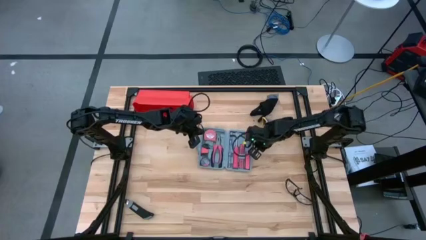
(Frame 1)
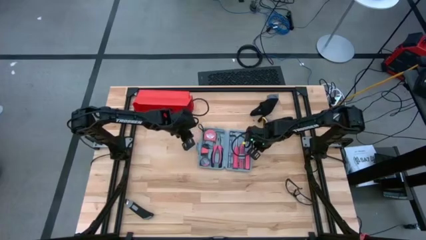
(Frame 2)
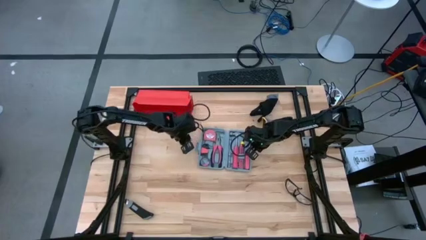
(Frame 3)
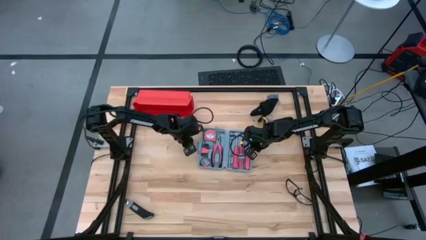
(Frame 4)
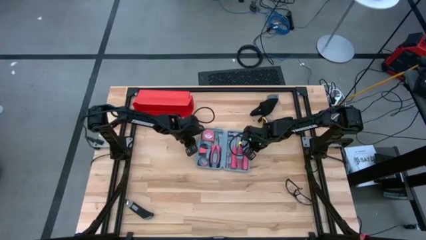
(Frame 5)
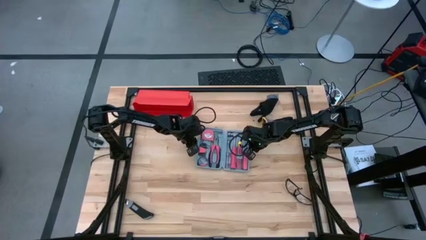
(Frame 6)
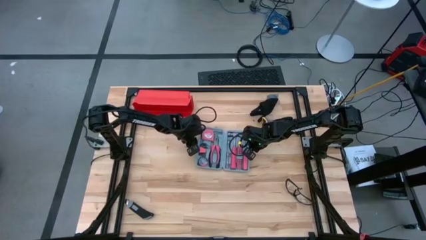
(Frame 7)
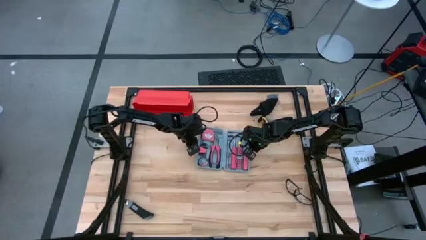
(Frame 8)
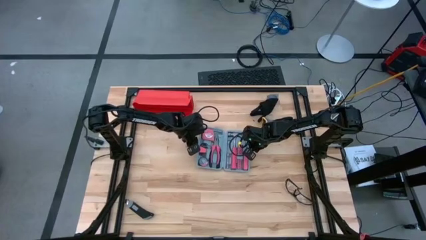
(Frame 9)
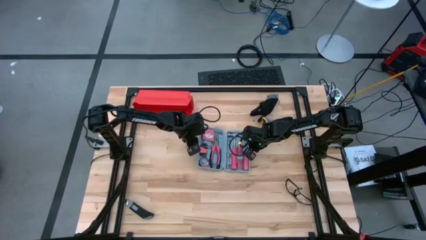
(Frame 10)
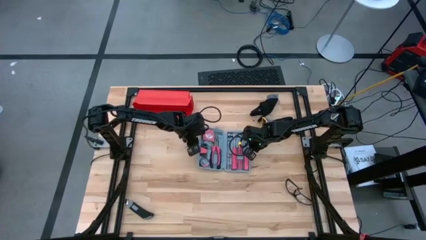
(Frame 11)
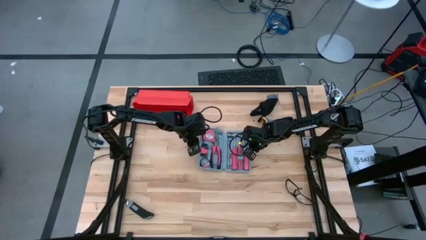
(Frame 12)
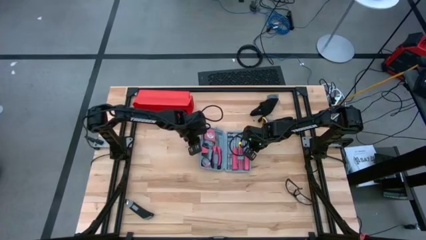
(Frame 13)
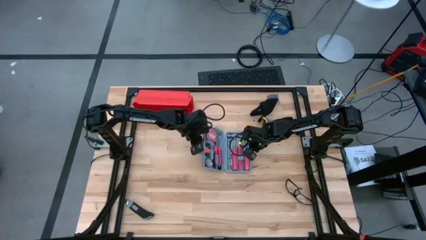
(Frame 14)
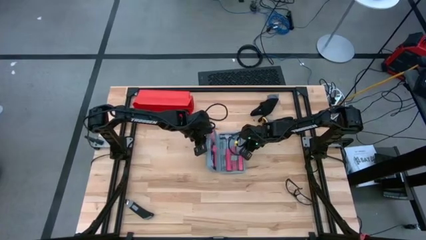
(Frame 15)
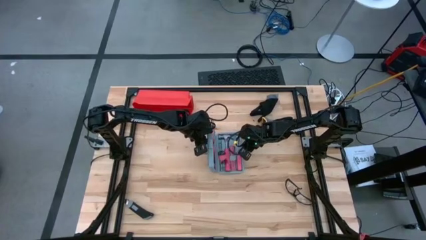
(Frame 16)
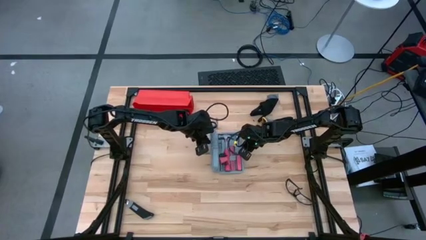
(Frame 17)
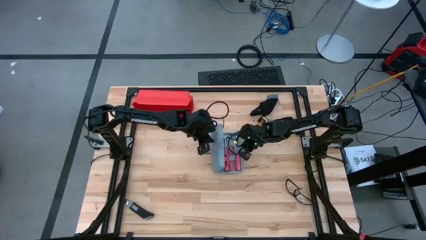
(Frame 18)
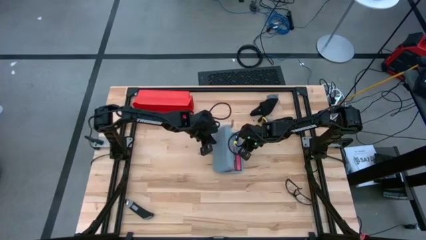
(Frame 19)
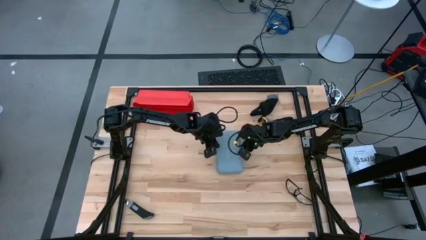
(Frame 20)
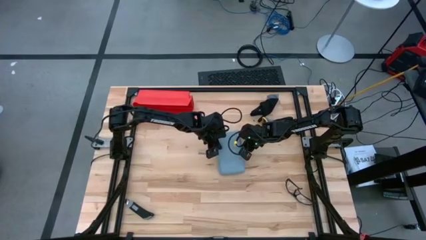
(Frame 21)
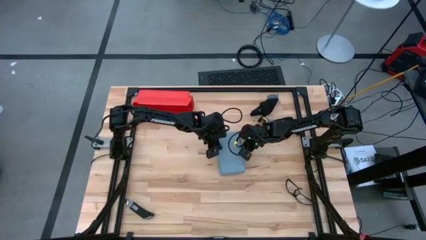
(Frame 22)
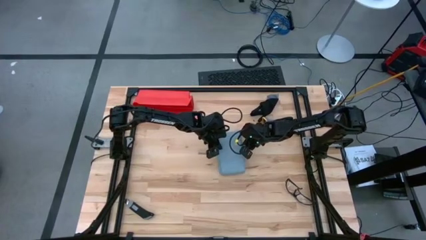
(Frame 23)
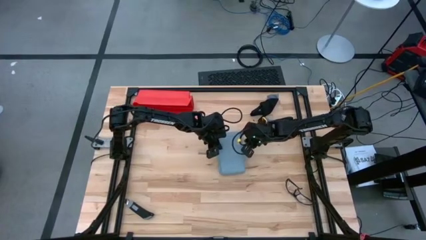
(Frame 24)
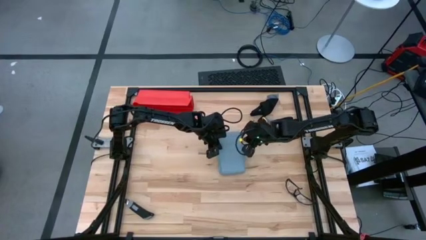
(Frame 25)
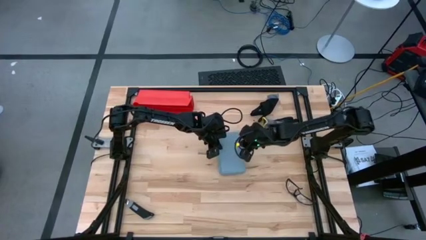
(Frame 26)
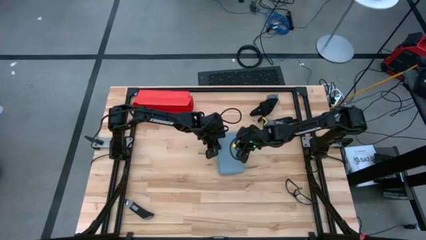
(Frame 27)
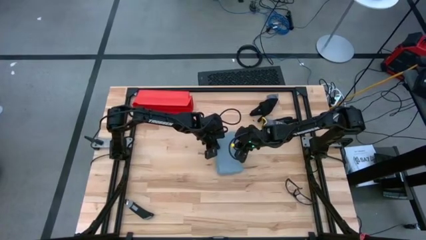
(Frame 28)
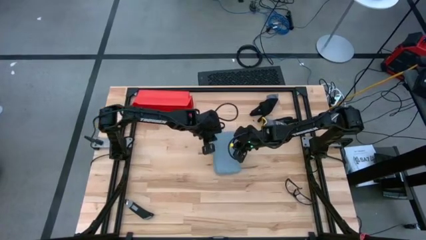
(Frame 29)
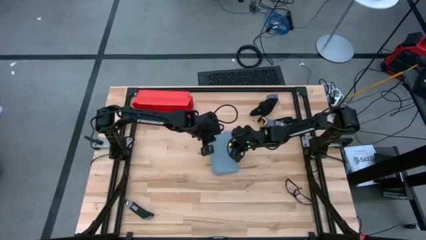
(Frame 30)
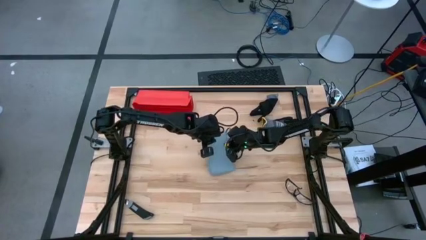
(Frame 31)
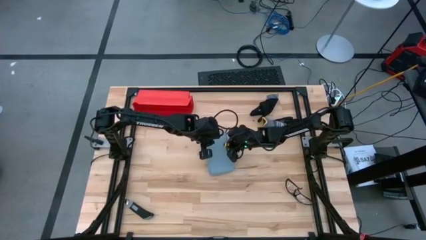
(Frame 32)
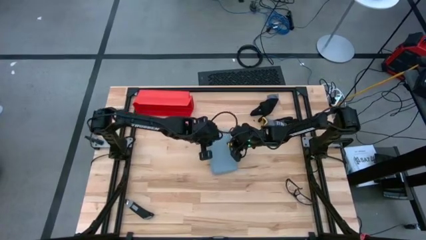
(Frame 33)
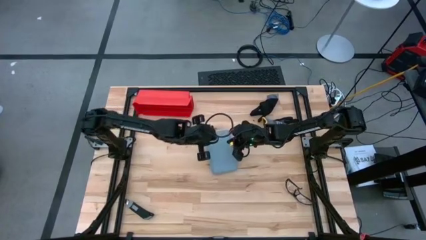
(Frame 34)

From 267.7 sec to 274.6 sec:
Task: prefit tool cases
Close the gray pre-fit tool case

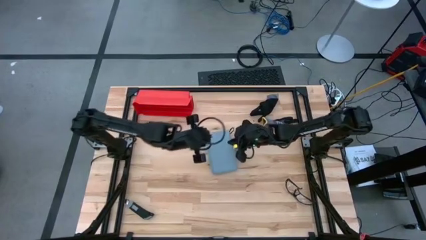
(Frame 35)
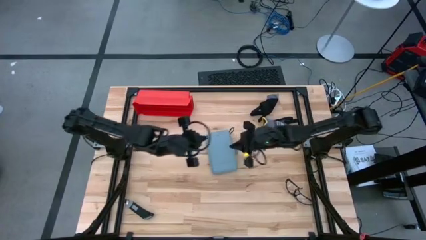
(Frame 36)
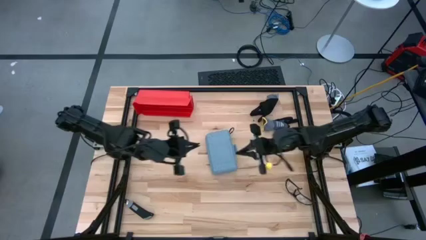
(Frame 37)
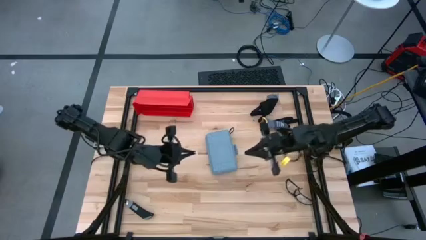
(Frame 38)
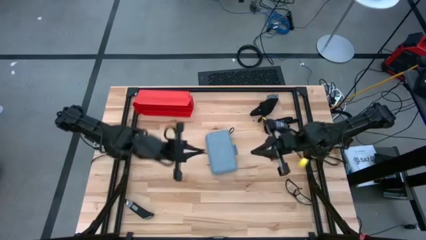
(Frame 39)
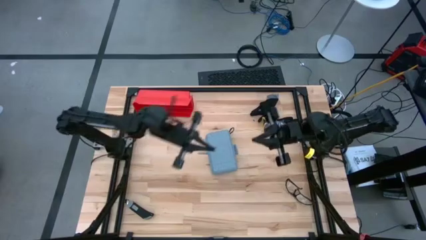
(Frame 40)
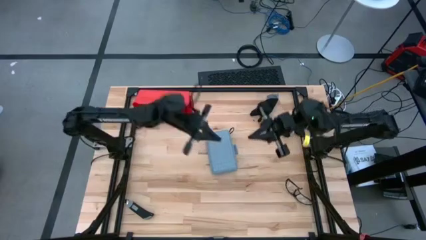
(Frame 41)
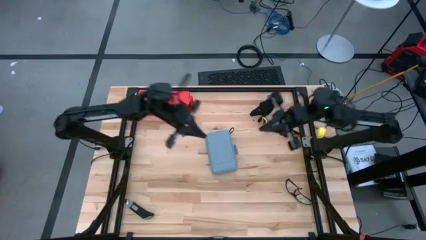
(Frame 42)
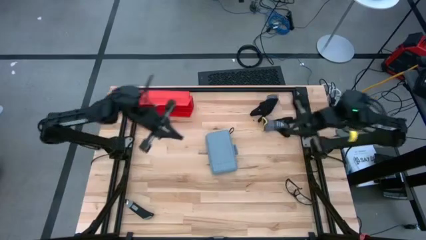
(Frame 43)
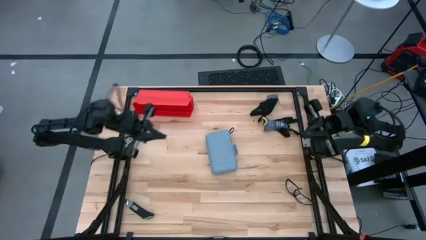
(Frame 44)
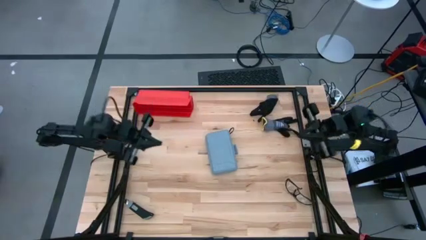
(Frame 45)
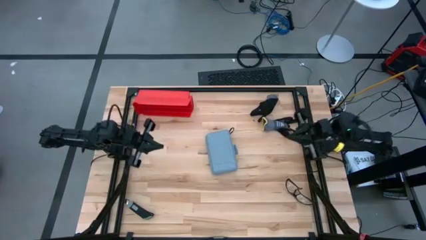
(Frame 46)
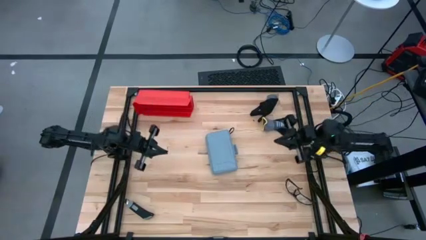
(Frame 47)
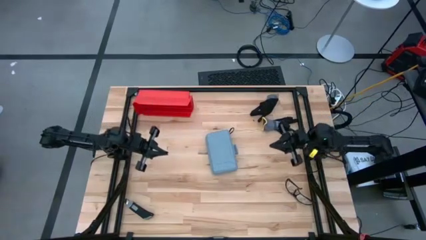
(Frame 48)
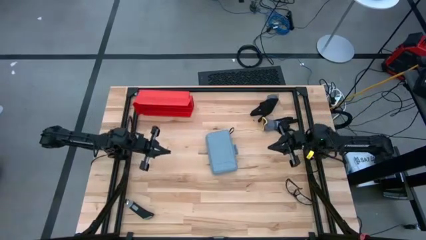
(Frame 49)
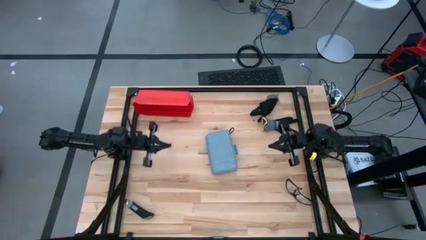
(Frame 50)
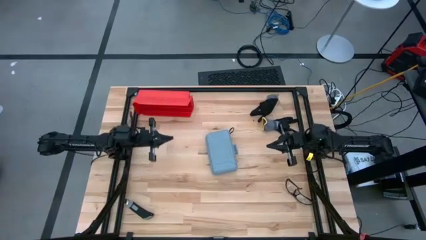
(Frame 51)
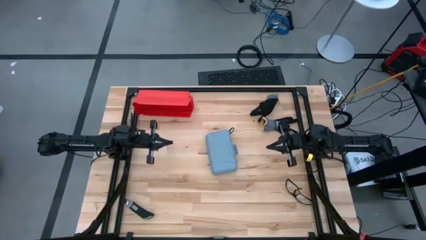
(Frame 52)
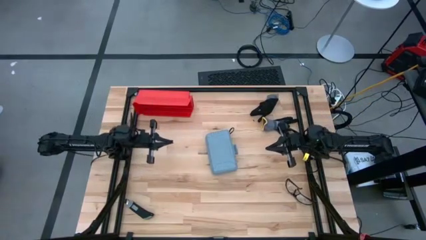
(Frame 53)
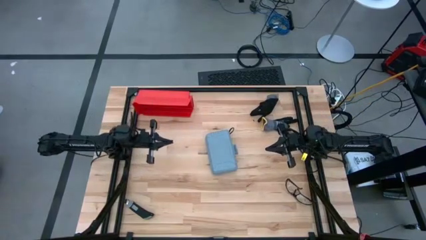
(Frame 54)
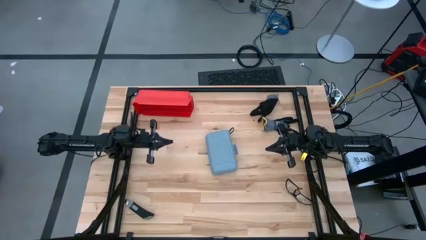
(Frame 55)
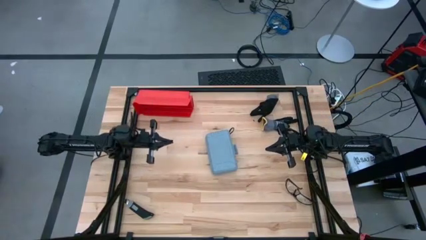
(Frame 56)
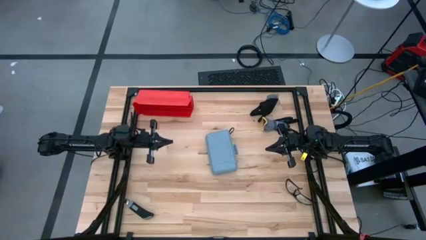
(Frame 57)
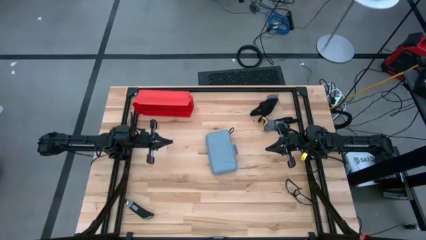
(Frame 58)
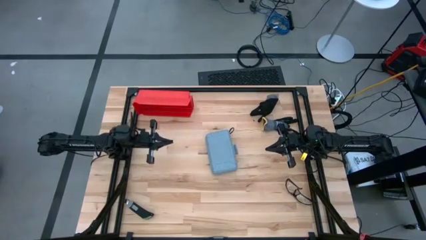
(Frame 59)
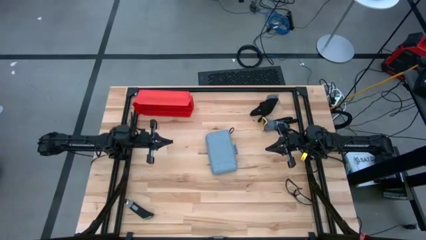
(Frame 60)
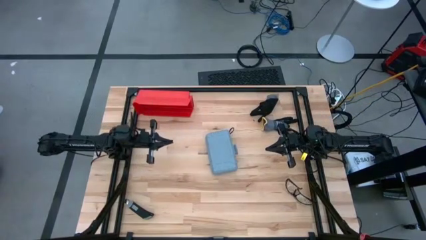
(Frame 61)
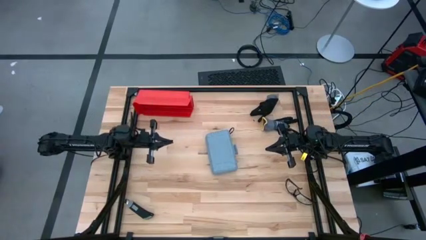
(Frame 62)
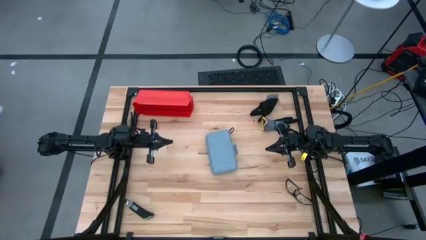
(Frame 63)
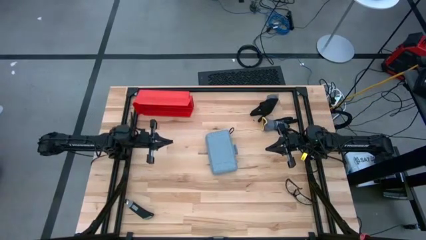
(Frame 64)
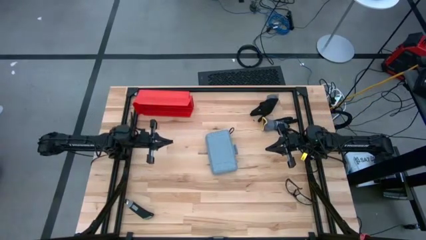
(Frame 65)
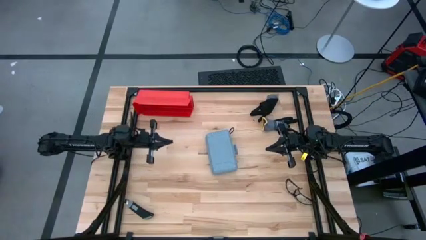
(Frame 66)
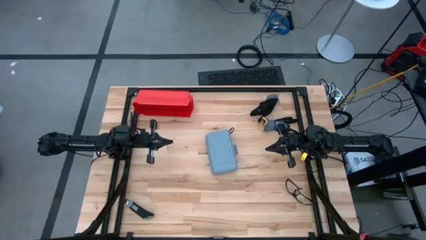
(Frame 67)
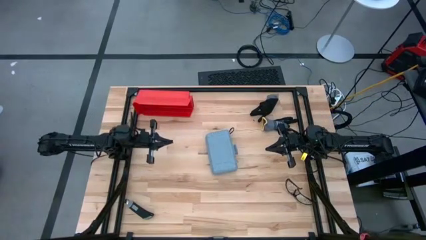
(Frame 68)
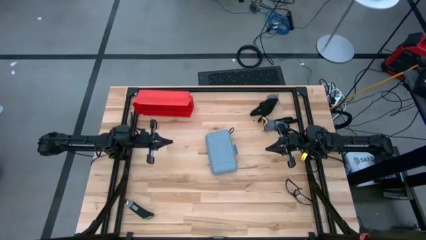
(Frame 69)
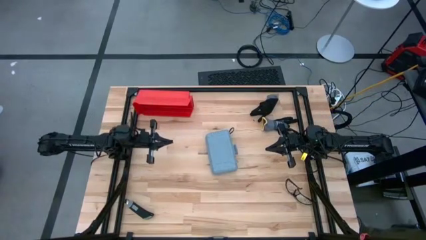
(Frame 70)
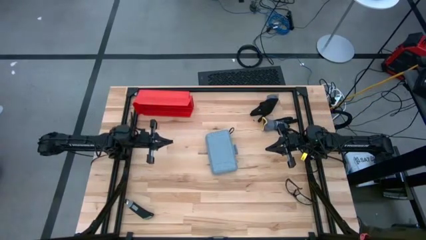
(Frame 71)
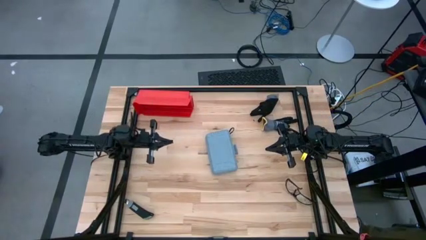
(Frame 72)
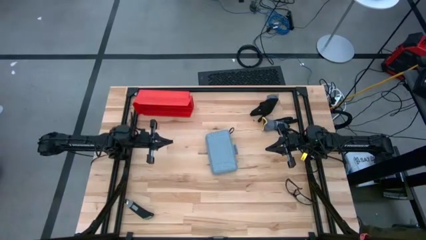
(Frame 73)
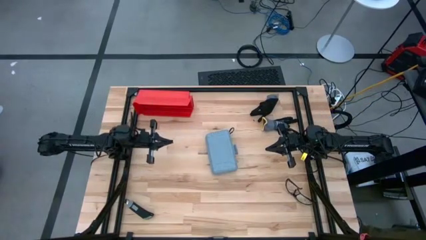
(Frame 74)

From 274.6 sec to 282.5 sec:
Return to Home Position

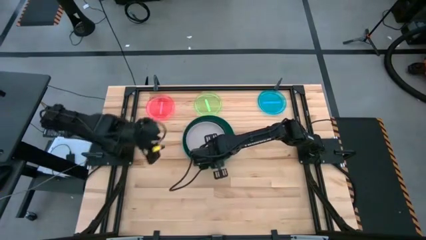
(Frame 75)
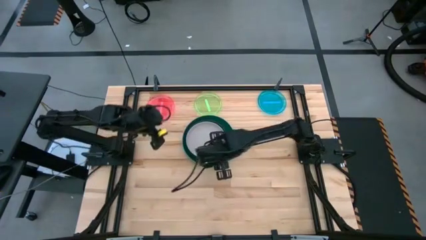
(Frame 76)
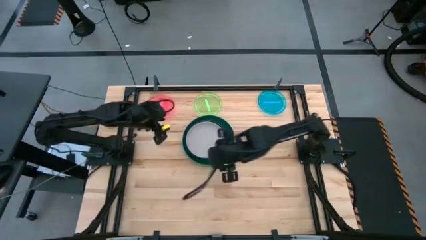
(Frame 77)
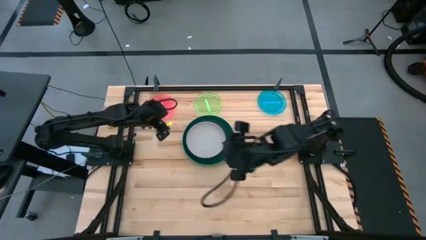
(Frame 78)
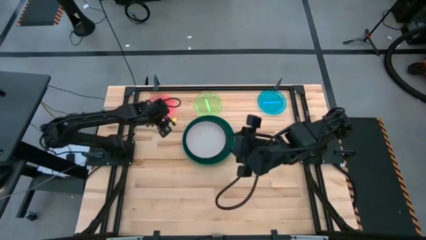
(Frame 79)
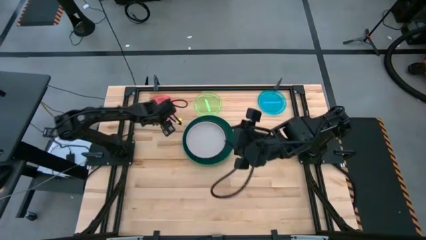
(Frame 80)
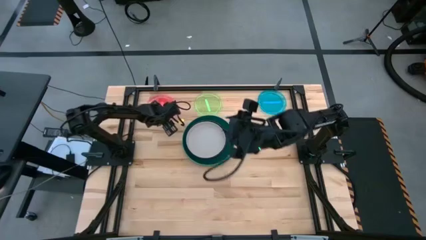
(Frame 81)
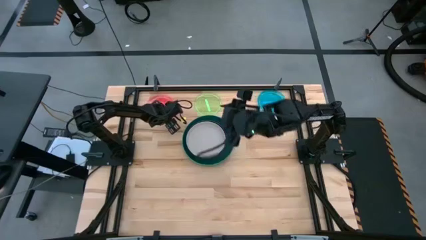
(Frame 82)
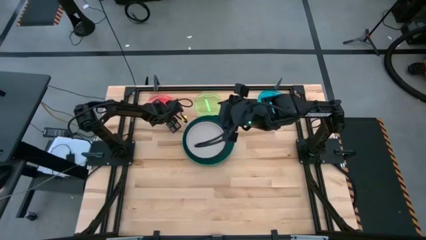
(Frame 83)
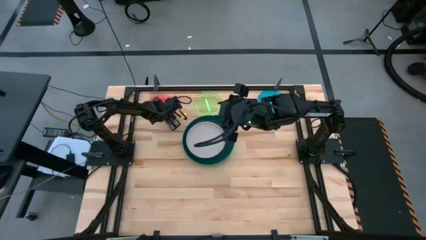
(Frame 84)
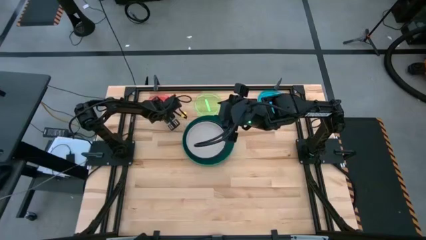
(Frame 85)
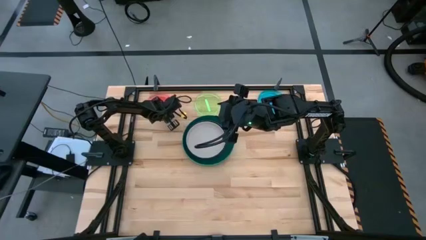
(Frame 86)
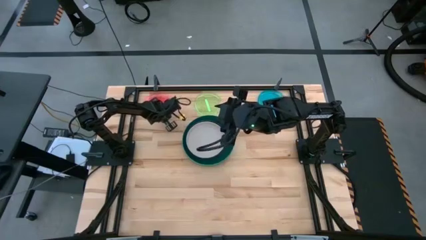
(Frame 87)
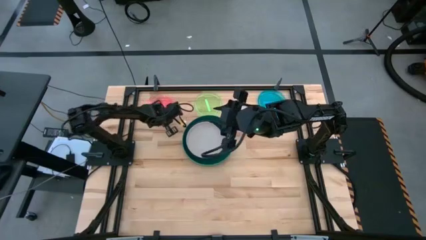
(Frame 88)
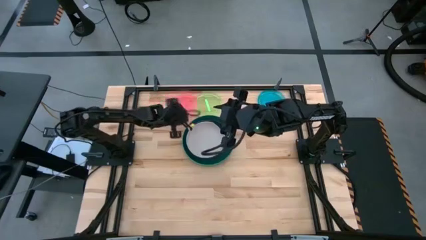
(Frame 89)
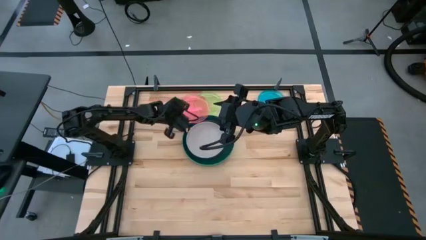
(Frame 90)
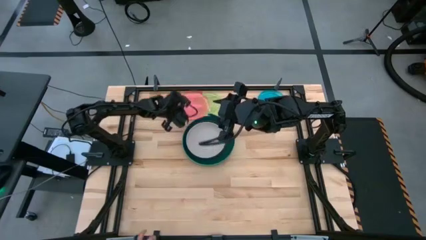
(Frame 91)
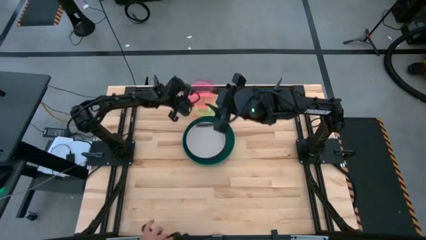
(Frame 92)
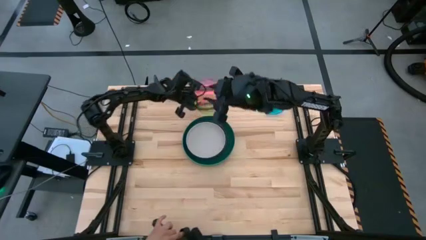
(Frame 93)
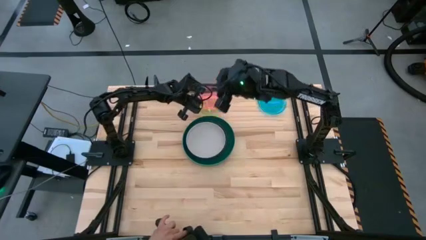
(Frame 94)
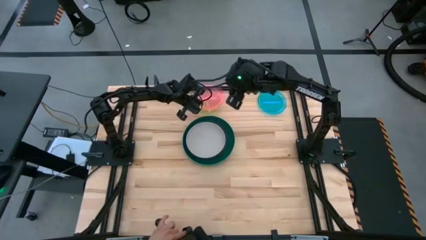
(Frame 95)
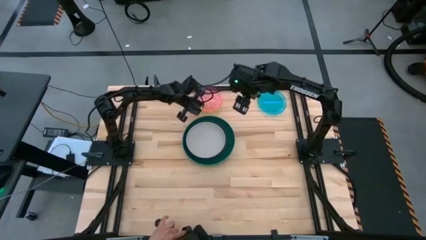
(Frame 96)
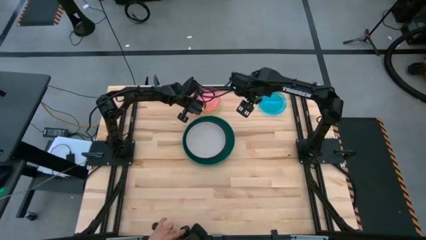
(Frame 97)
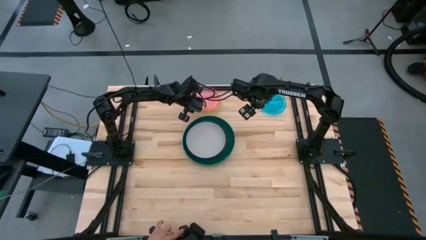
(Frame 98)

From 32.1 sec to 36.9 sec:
Task: Stack plastic plates
Stack the transparent pink plate on the transparent green plate
